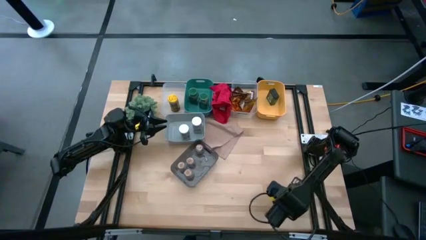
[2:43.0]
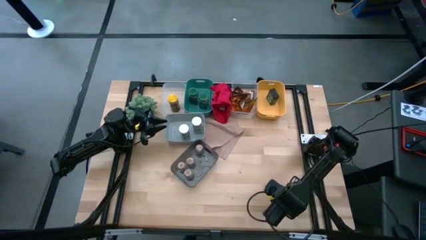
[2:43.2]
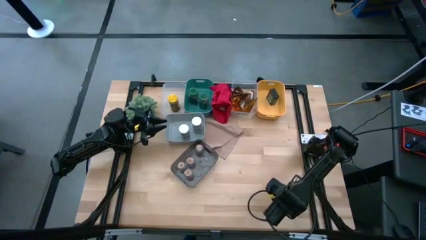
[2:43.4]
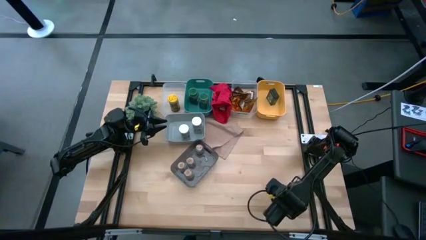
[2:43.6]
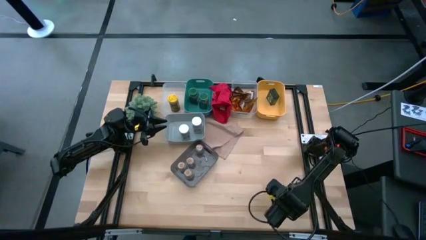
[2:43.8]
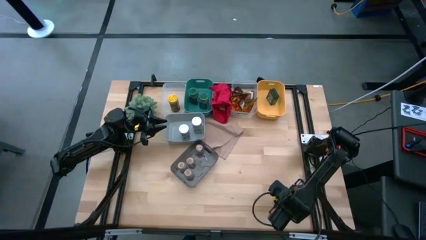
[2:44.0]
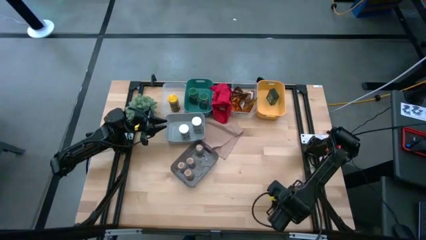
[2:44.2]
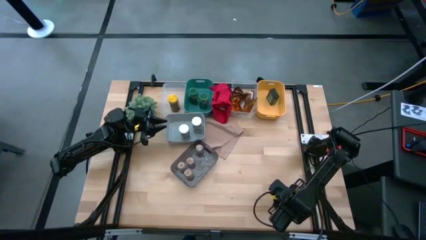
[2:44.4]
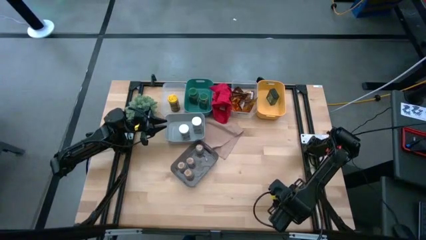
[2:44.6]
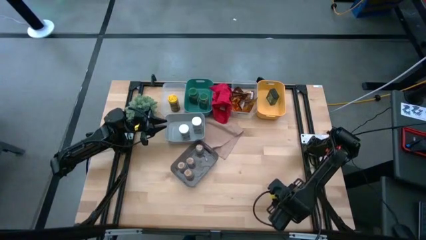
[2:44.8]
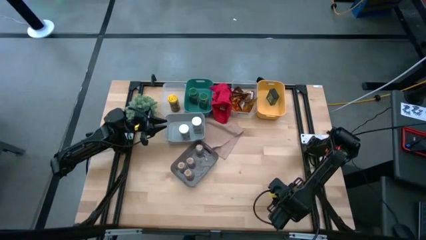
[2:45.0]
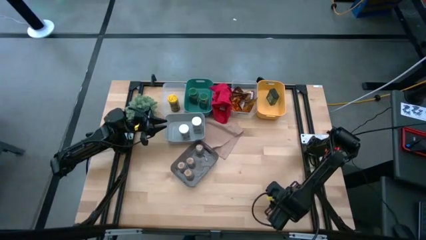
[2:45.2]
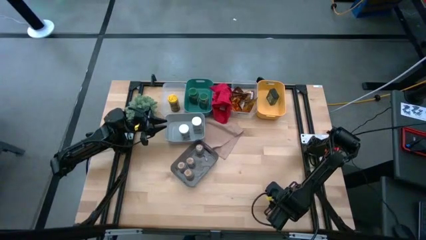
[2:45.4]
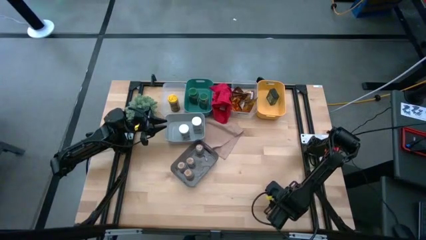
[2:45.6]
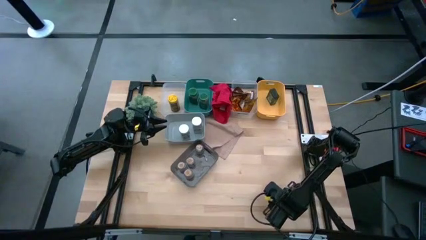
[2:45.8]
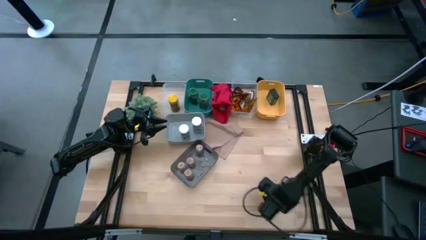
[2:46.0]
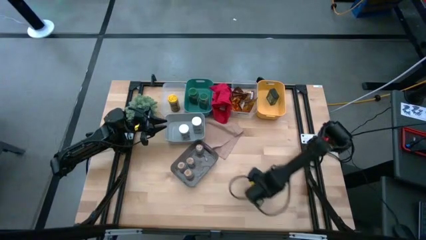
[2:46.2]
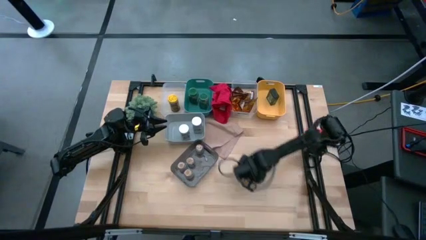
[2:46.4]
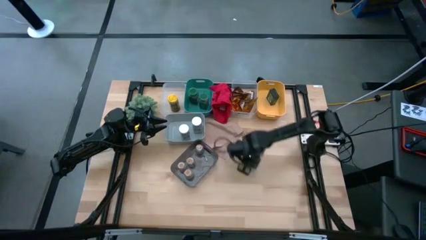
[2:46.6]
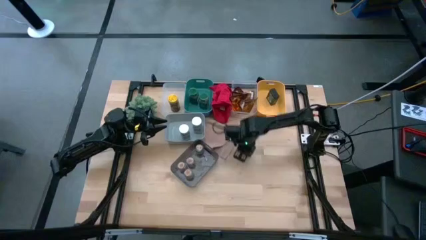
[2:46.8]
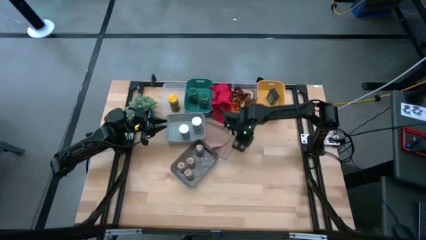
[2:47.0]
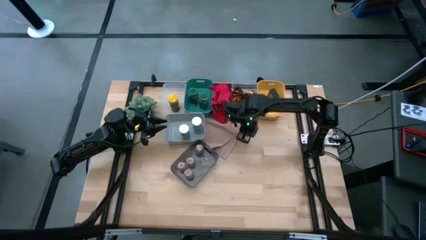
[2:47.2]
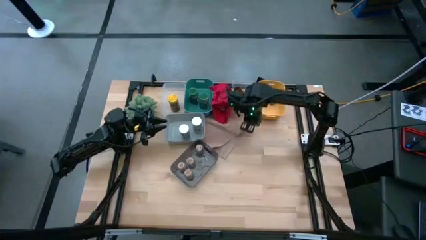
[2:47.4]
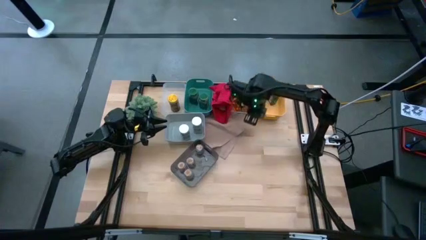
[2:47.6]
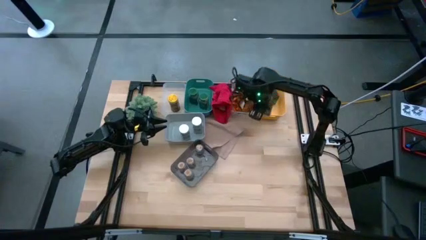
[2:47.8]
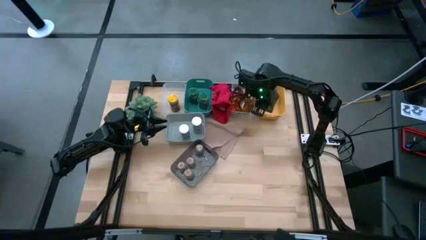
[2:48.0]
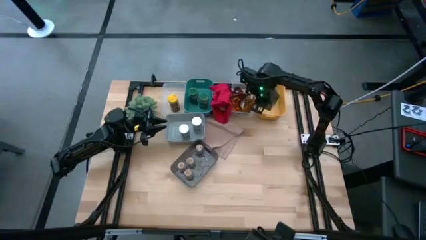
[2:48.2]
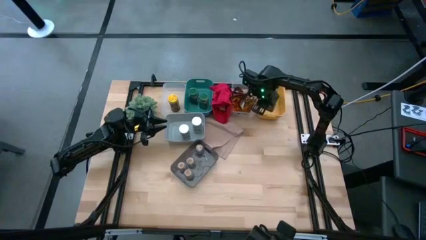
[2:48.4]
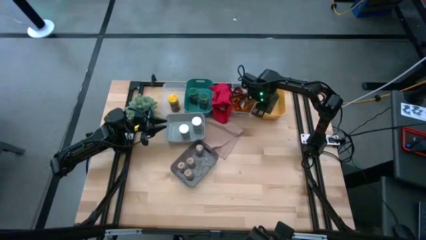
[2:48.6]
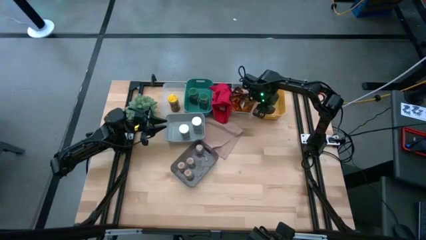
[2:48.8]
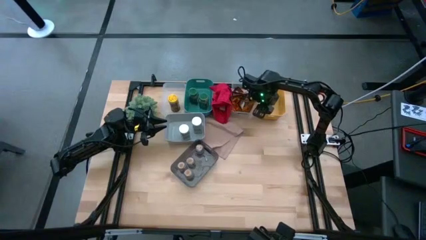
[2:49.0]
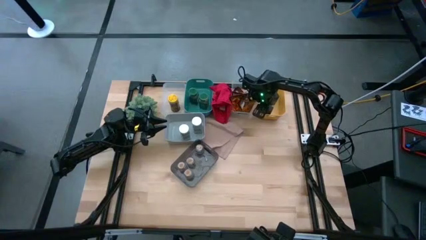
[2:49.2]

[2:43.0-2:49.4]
Task: Sort spices by type
Put the black seasoning can into the yellow bin

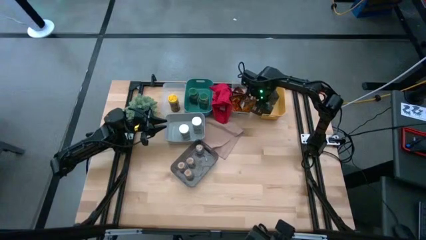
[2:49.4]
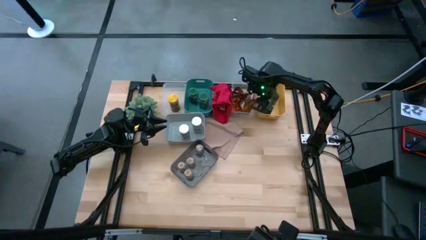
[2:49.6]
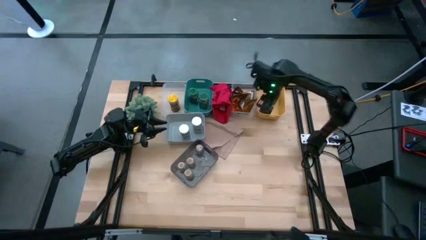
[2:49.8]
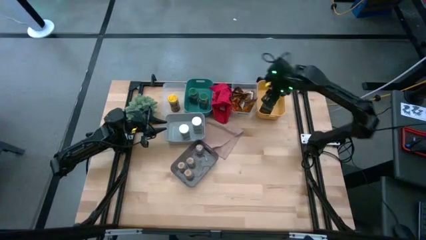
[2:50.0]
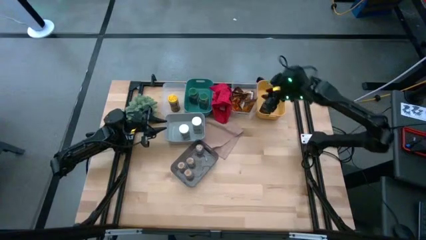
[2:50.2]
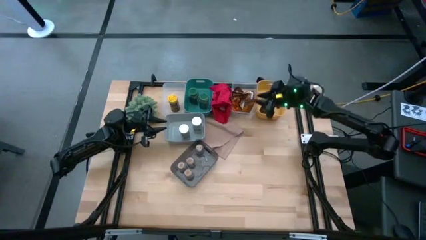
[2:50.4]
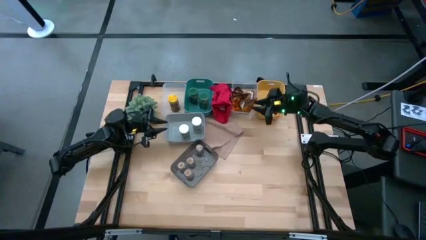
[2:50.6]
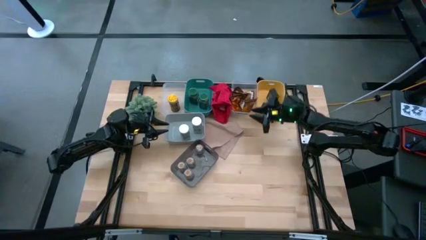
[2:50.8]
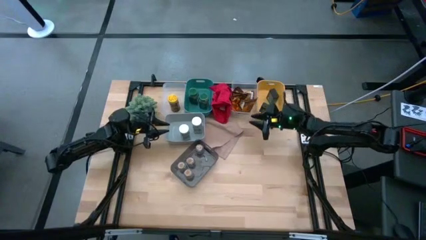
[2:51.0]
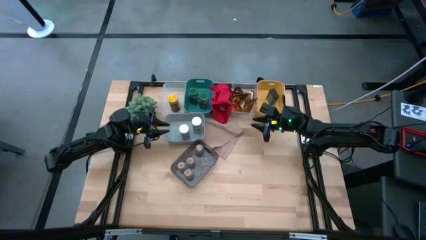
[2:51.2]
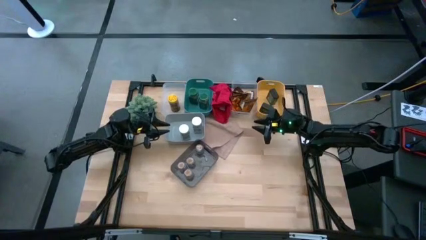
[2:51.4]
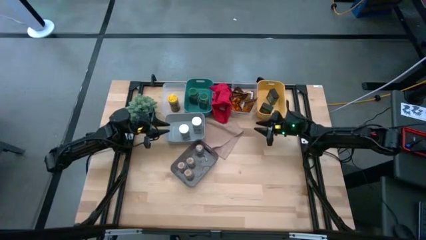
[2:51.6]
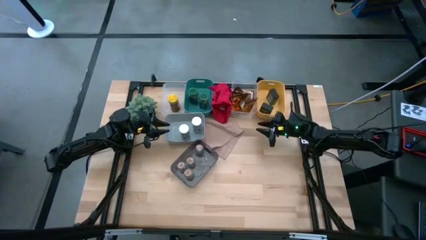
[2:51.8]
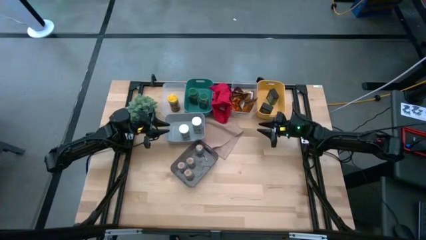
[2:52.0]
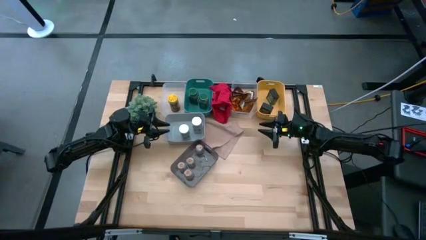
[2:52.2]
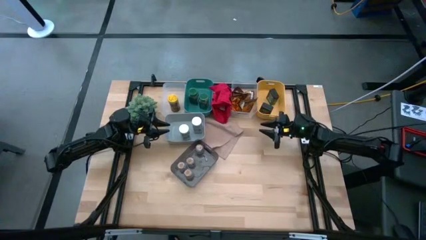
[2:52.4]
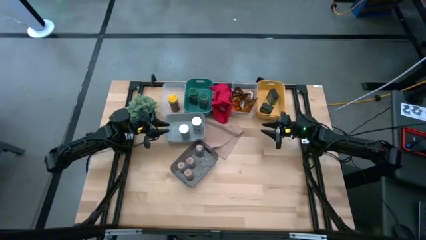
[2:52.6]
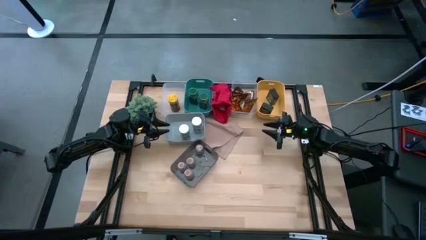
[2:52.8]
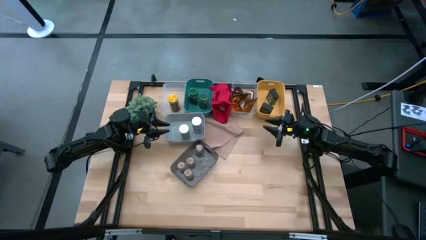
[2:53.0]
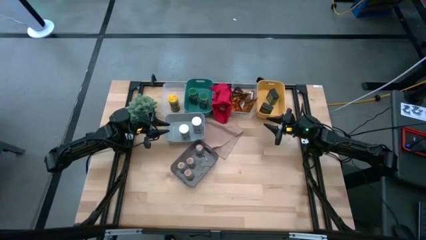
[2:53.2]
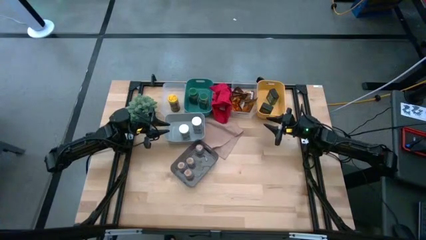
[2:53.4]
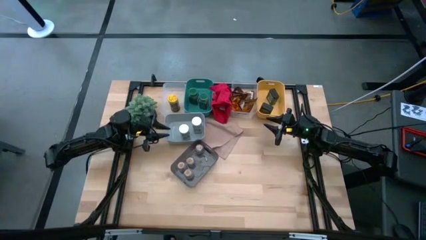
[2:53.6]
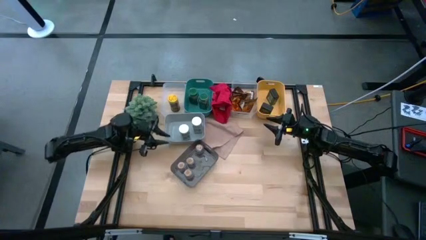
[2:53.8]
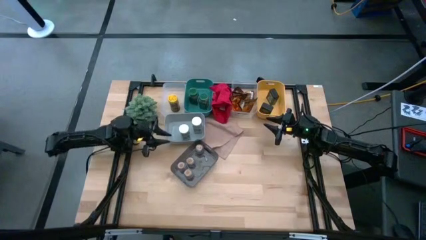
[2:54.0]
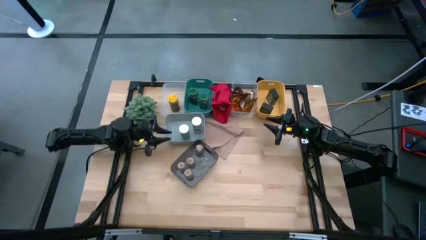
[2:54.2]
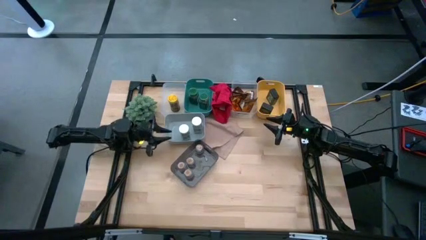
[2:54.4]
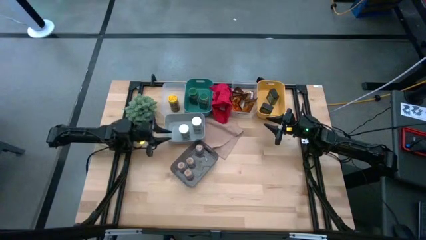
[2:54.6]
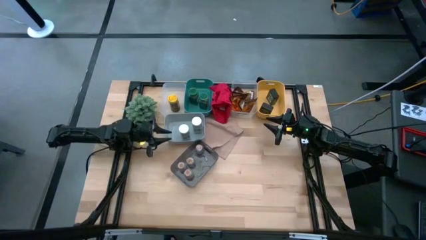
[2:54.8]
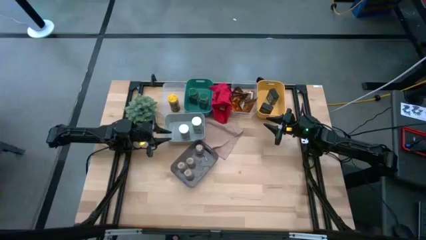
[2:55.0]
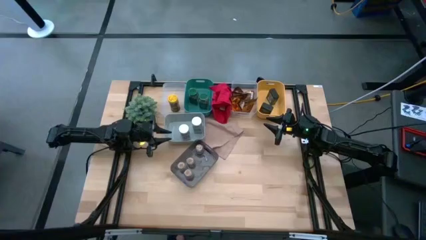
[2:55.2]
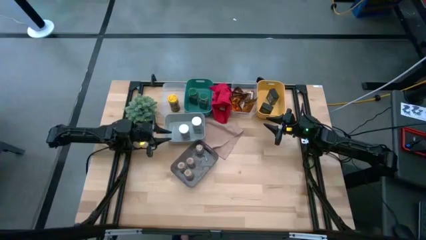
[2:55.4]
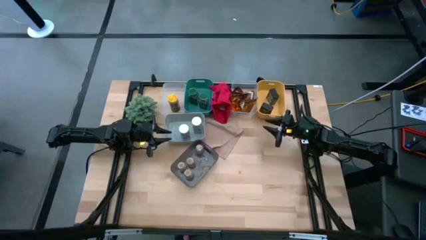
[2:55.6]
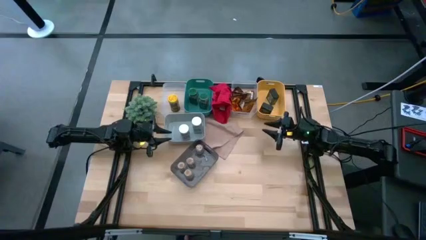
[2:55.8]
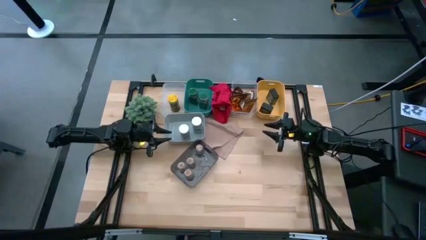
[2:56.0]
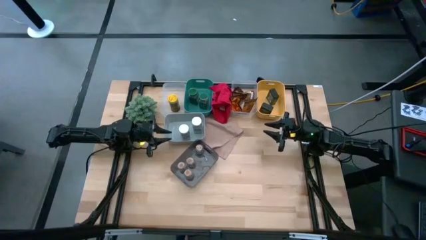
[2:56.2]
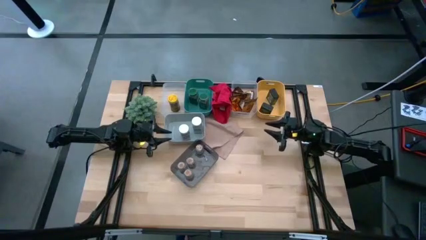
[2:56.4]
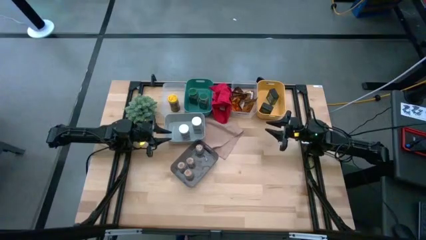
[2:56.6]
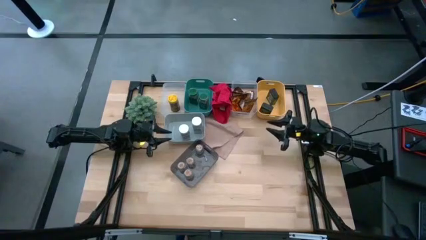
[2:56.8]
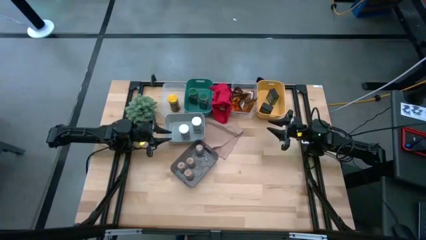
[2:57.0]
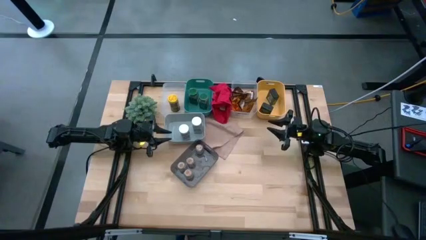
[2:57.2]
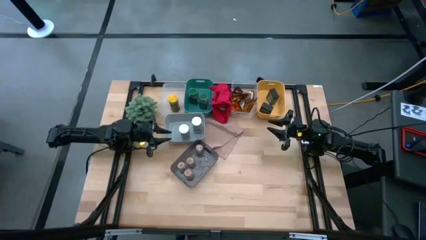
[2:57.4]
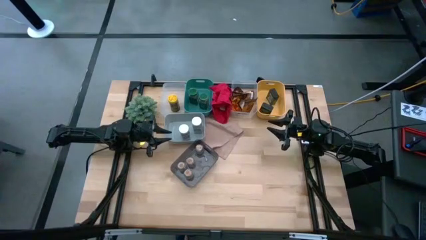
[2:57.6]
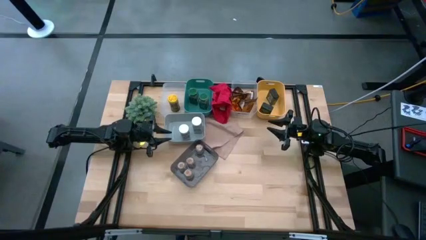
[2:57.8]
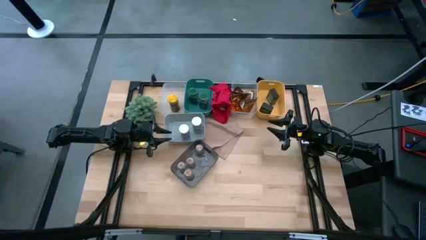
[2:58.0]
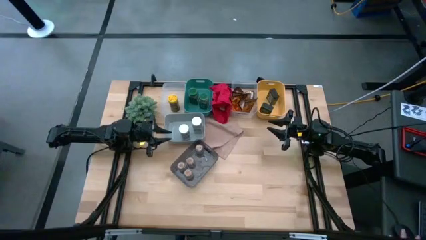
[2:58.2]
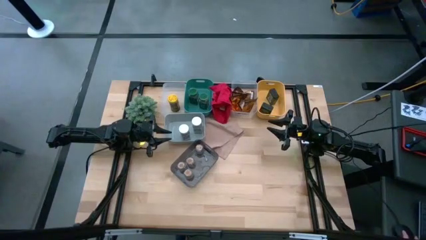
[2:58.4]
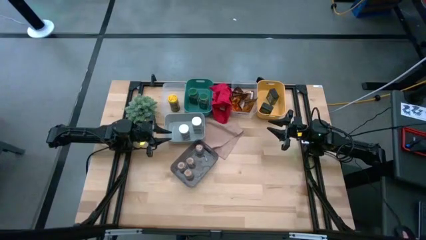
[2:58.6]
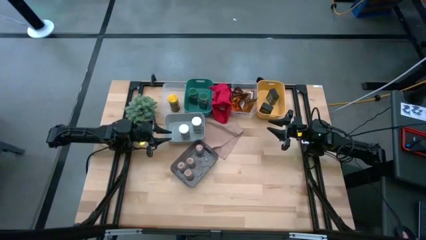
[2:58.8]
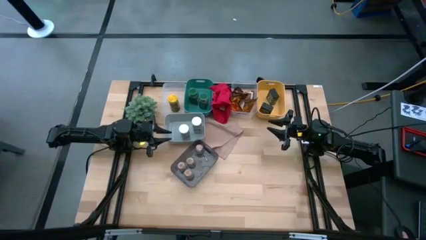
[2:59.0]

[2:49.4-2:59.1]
Return to Home Position
